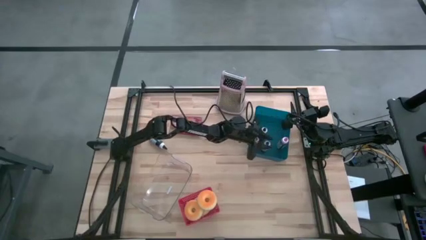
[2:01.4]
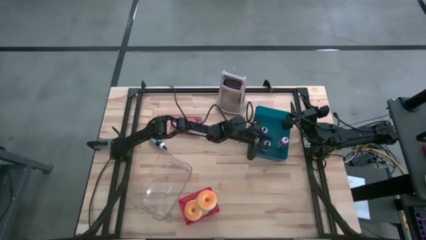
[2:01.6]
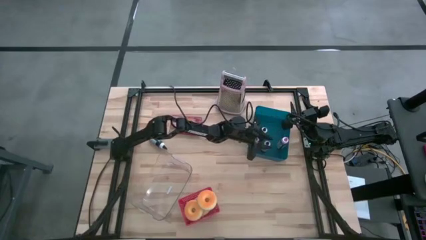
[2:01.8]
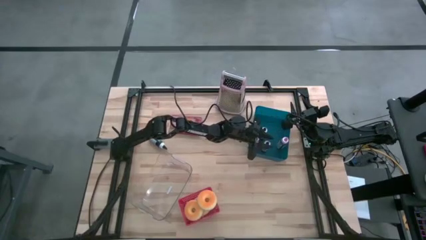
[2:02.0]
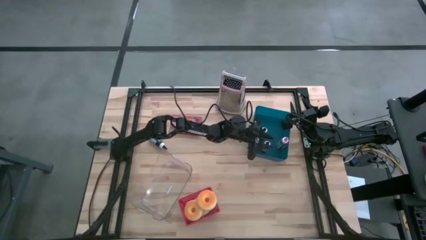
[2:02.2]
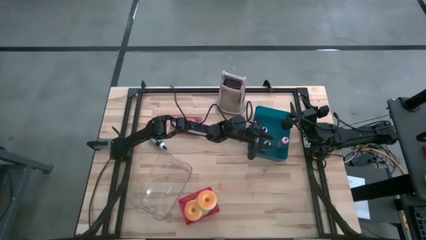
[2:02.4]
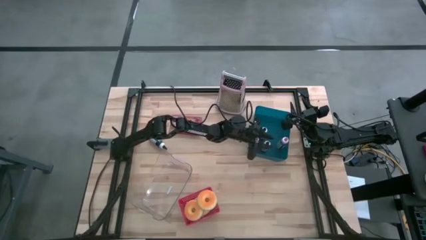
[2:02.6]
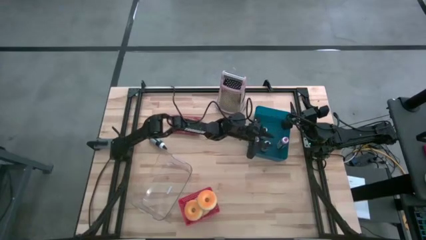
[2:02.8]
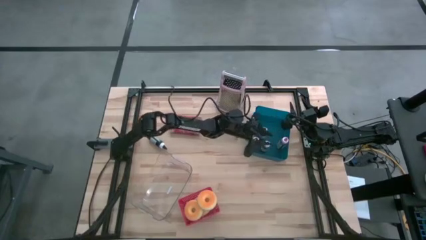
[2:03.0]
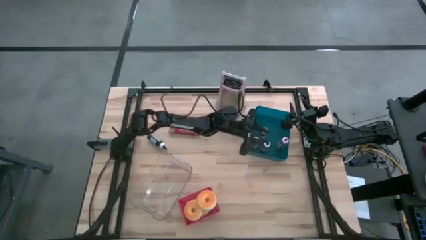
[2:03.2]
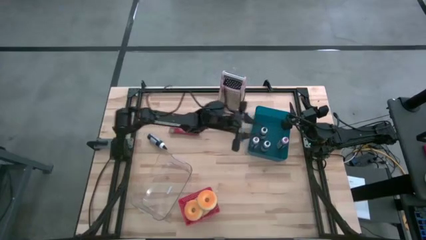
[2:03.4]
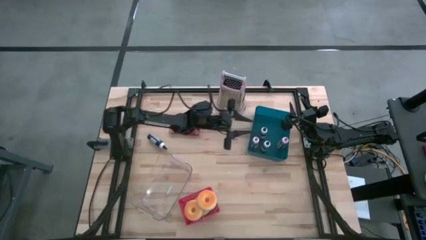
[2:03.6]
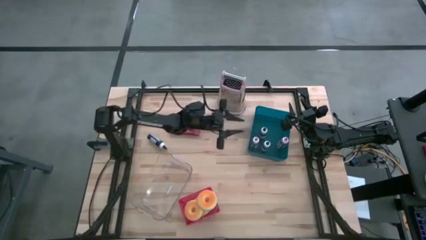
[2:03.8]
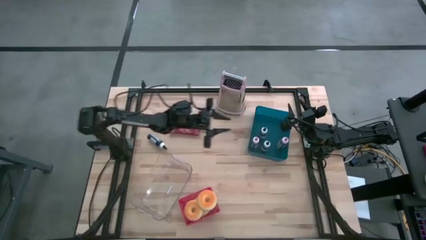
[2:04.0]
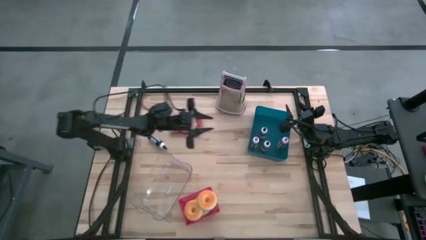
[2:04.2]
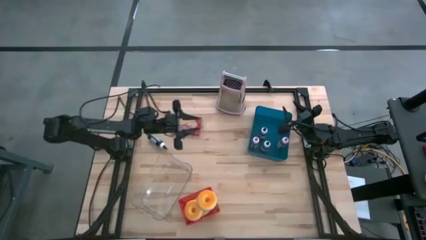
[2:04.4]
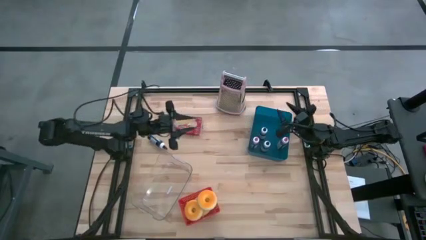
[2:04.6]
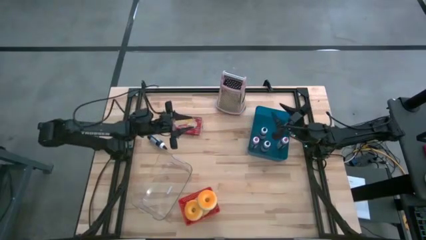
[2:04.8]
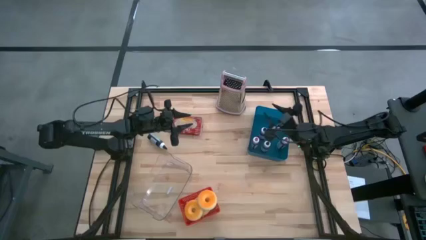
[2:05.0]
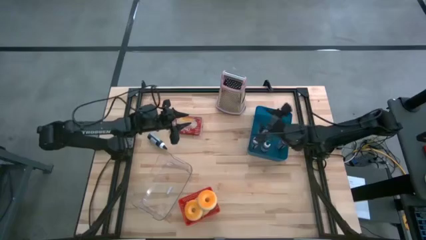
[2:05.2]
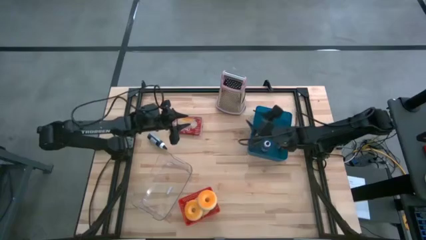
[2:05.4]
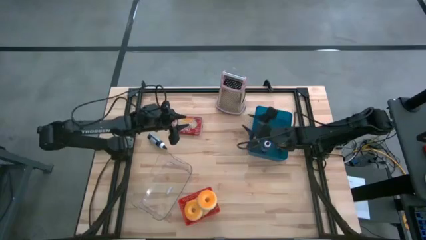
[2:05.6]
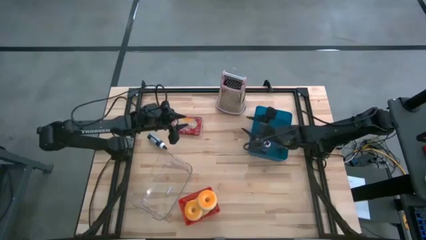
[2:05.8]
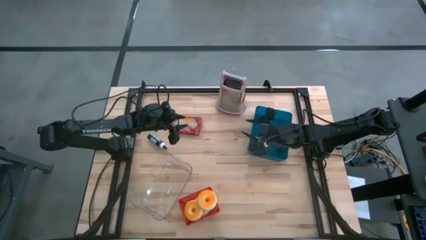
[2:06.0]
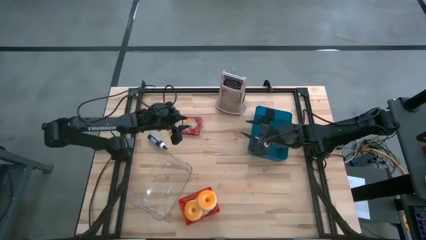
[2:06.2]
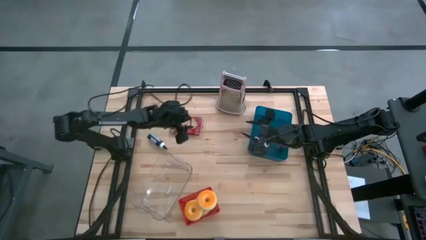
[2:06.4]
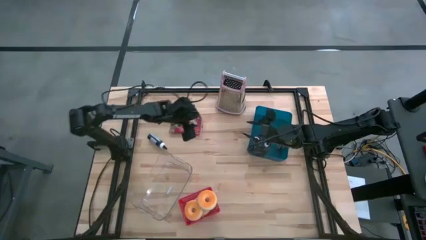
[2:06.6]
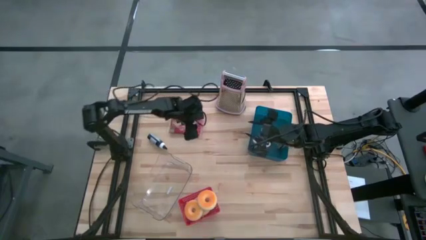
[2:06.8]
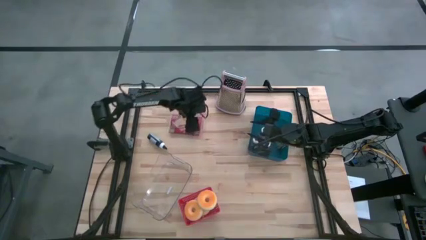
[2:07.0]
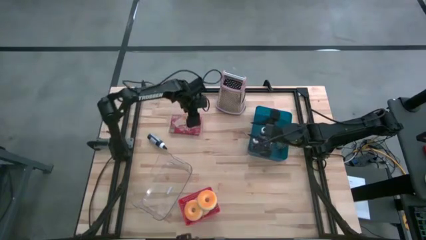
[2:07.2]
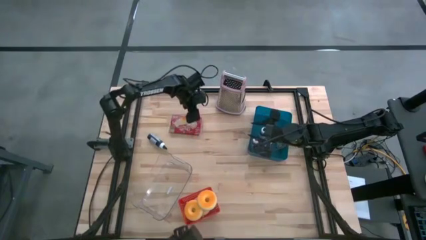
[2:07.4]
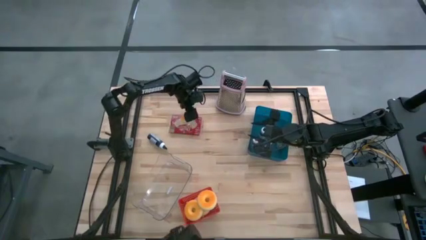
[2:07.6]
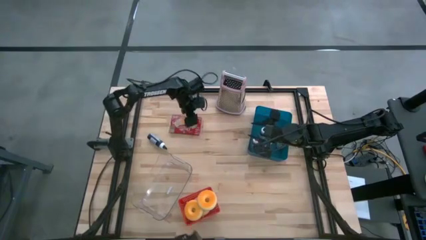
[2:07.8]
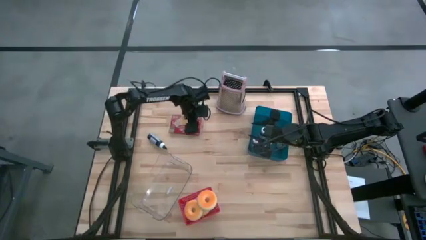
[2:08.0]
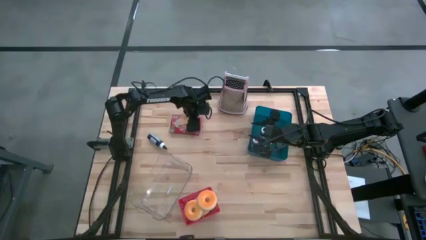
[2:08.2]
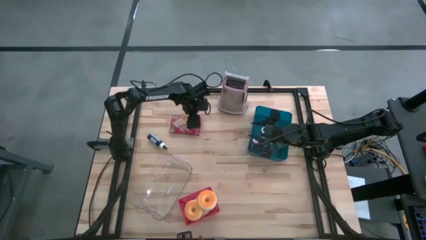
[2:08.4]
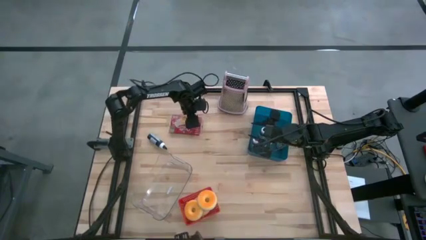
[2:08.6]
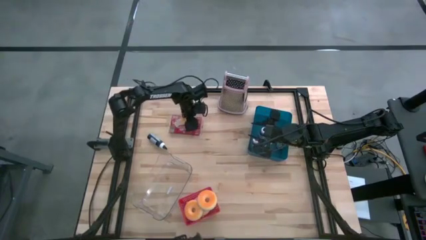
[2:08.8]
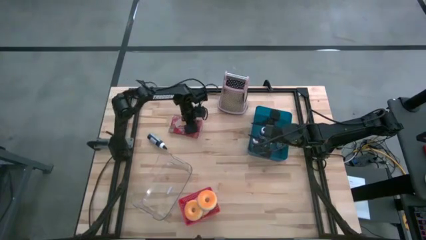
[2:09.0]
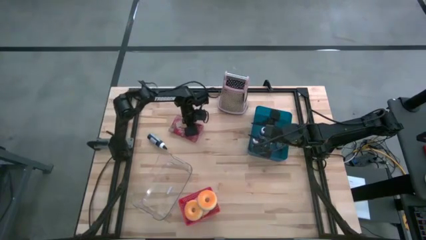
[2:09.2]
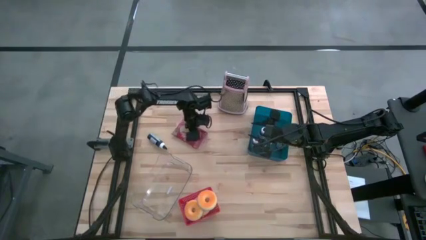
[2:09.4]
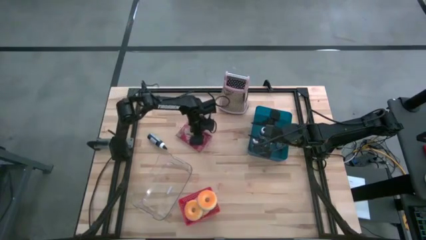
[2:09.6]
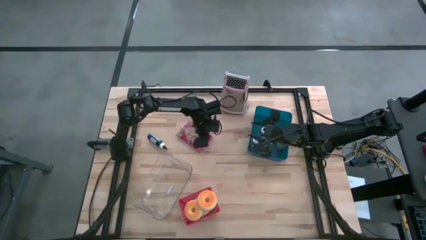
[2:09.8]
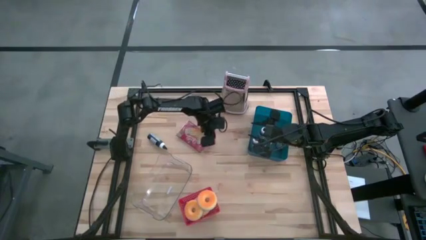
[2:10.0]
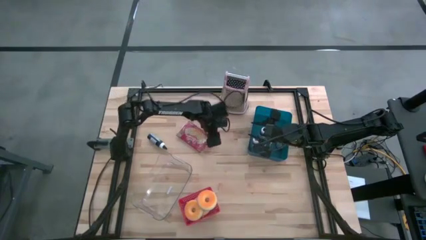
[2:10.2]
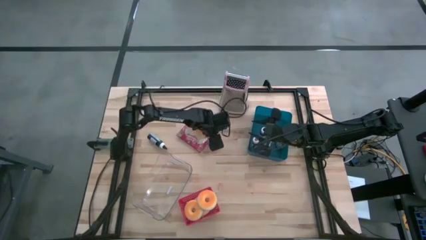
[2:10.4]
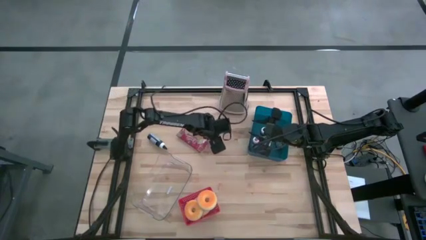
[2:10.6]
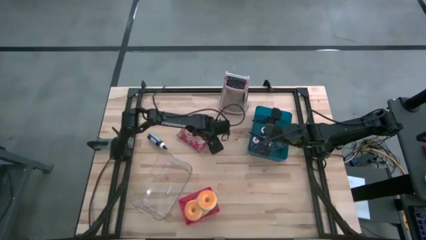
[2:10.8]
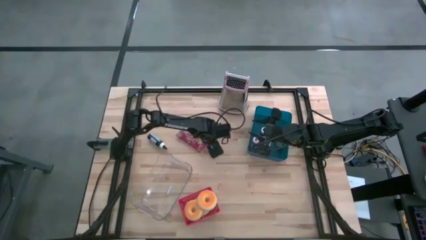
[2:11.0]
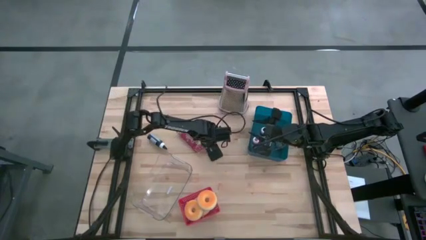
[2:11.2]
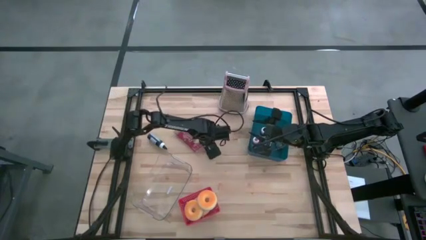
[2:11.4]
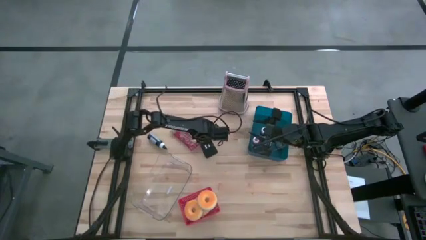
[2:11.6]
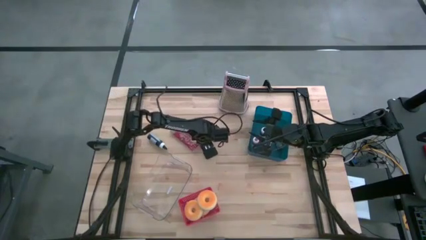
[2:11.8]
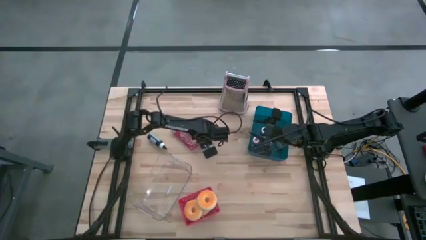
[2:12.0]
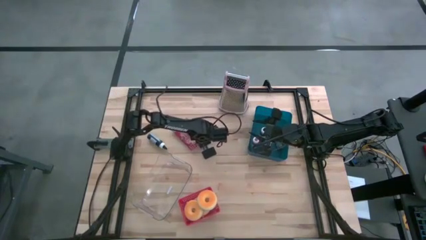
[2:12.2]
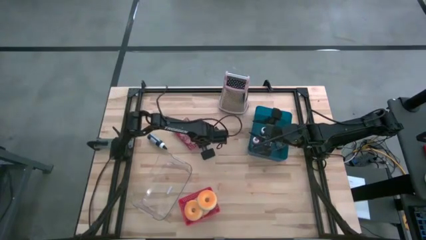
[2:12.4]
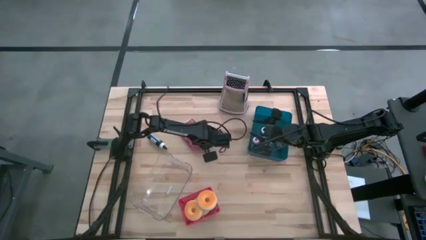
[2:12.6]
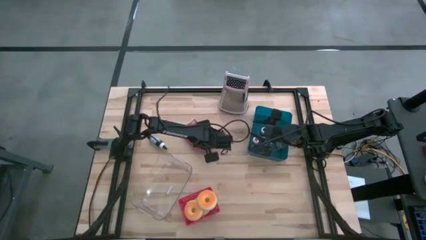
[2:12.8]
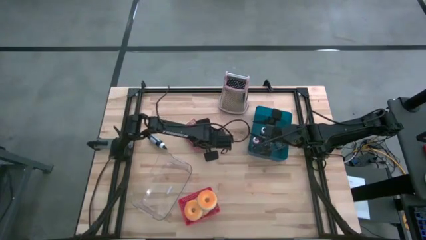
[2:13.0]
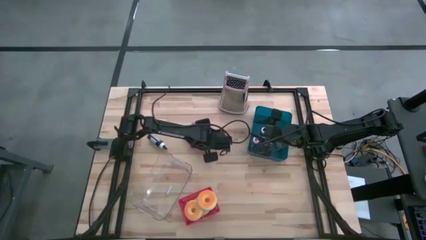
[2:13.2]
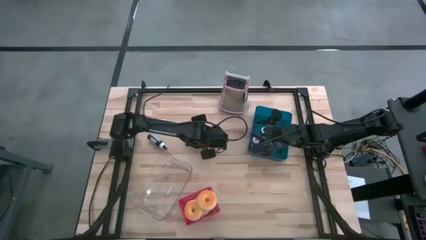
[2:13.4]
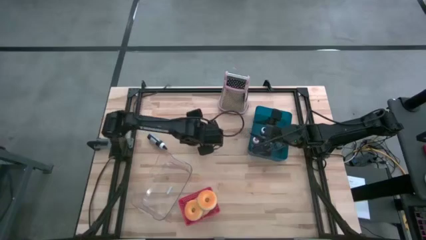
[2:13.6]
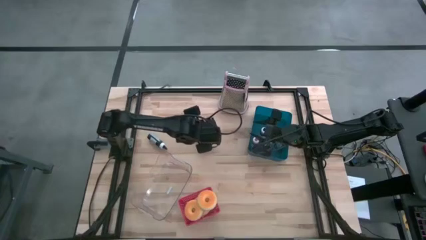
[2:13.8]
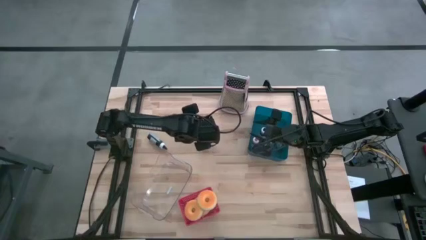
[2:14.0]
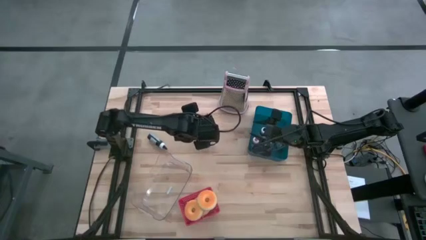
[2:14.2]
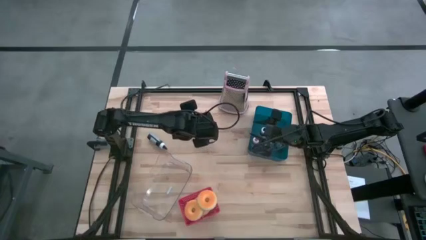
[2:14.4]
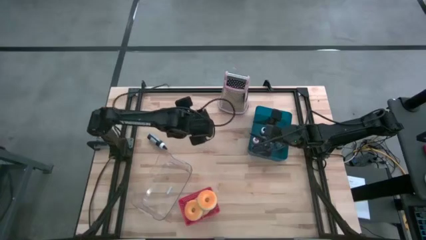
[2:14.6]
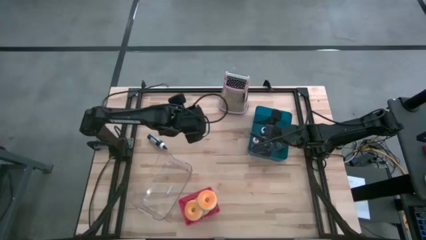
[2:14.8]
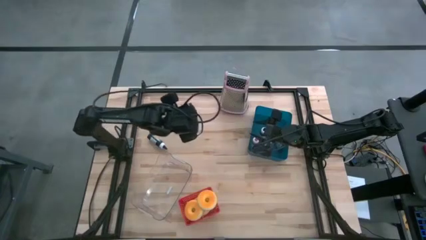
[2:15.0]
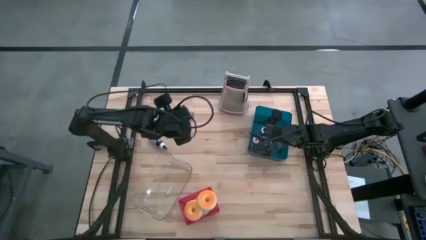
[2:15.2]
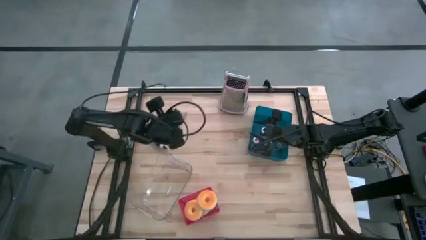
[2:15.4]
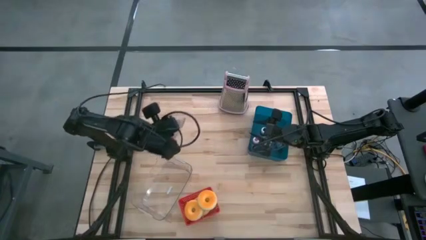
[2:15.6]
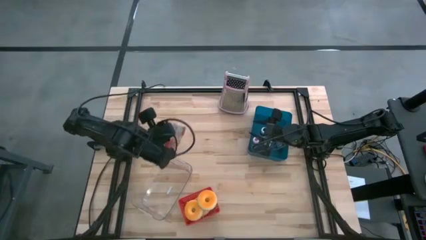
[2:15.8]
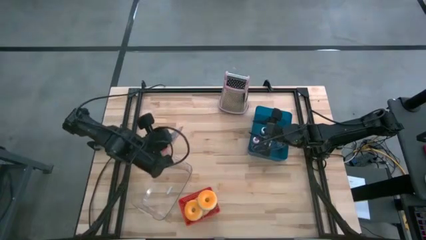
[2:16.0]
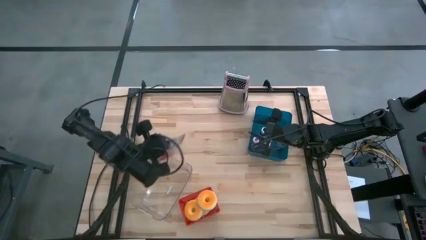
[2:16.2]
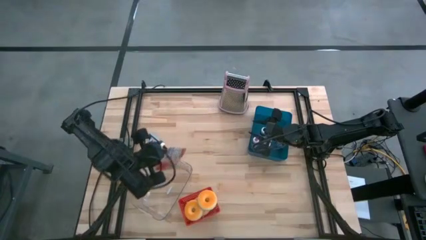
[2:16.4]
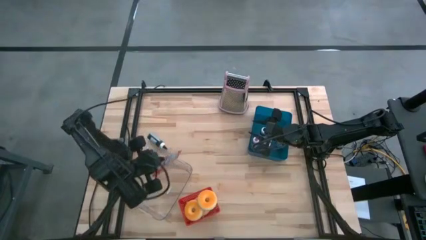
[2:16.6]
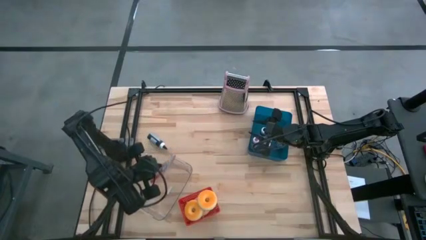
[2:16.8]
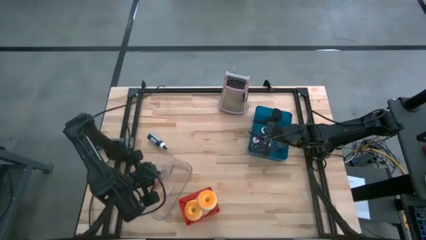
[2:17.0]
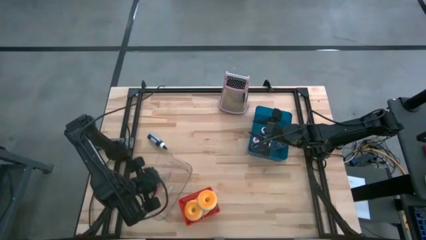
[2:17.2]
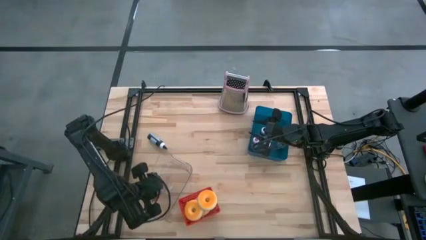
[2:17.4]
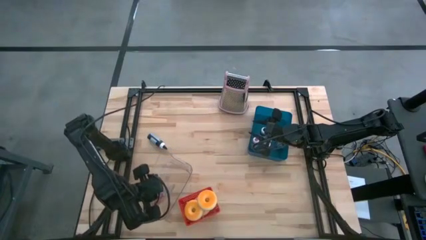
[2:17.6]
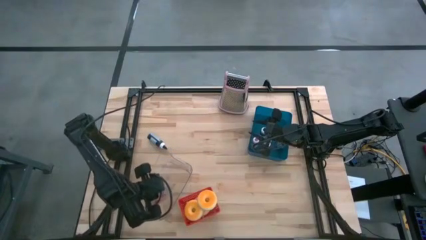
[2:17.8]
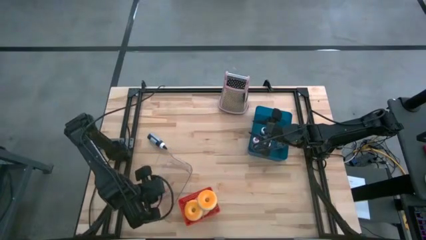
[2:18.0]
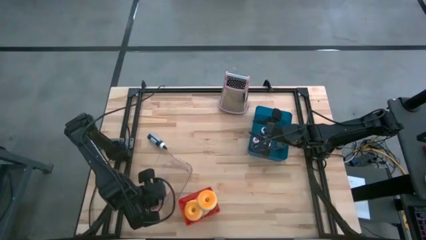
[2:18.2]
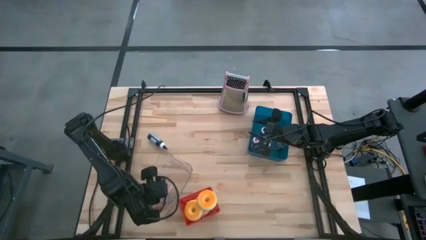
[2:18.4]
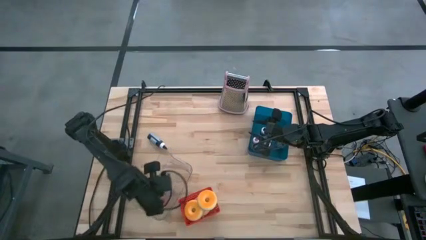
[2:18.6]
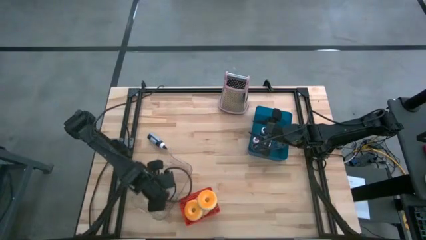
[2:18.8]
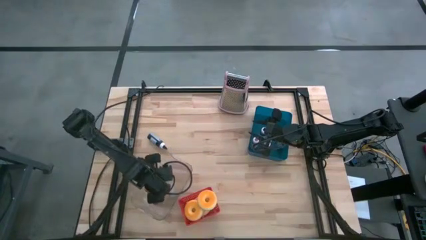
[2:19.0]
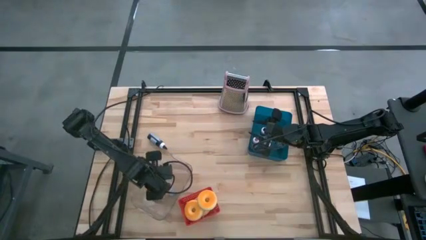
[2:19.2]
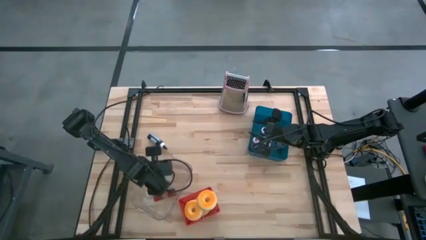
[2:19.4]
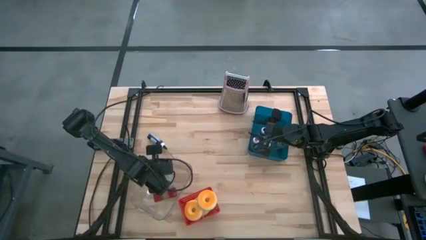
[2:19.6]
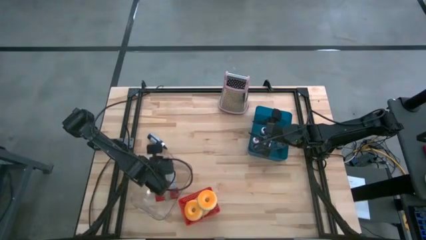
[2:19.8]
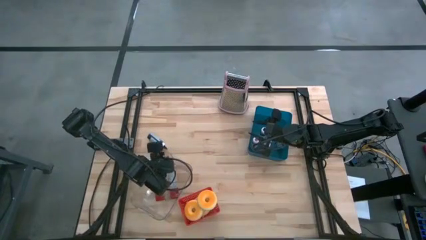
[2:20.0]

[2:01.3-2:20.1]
Task: Pick & Place Food Item
Put the popcorn bag into the transparent bin
